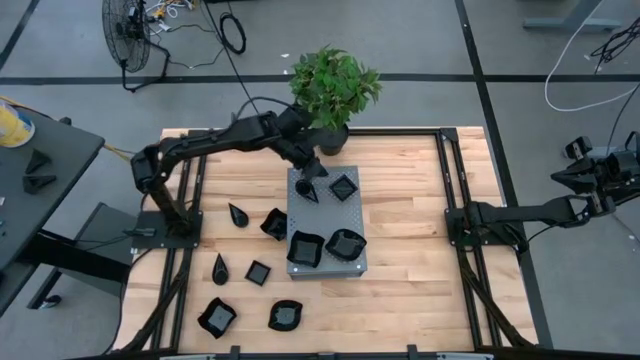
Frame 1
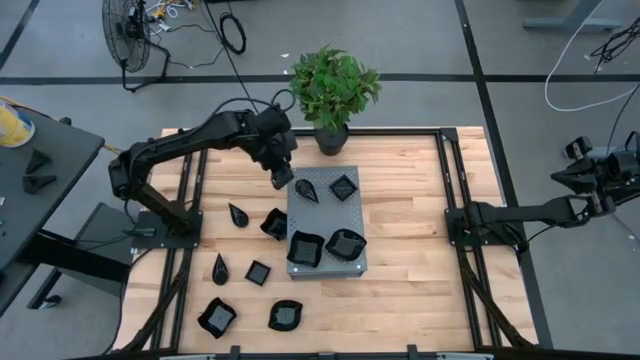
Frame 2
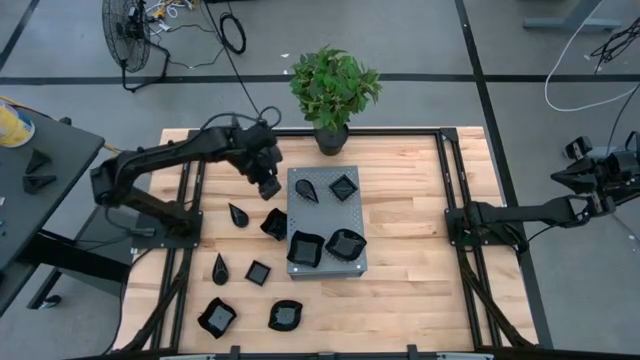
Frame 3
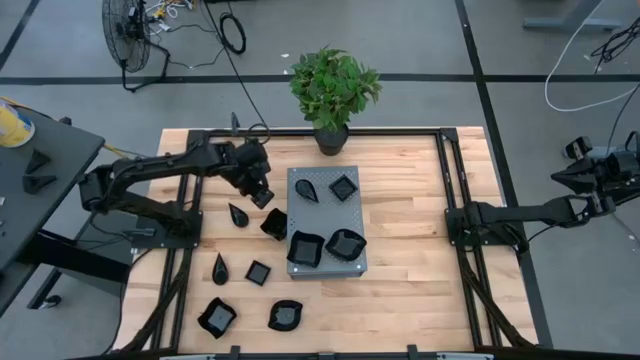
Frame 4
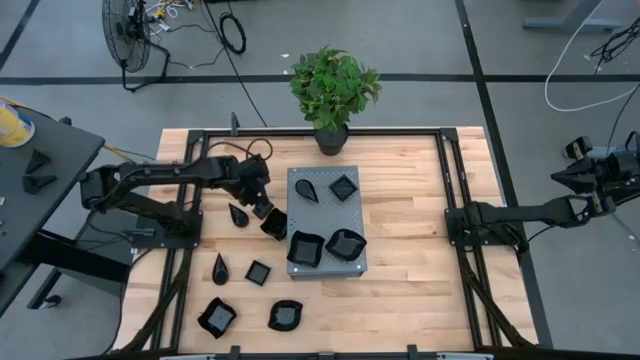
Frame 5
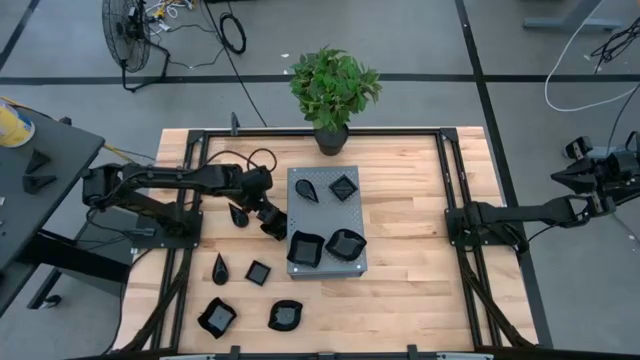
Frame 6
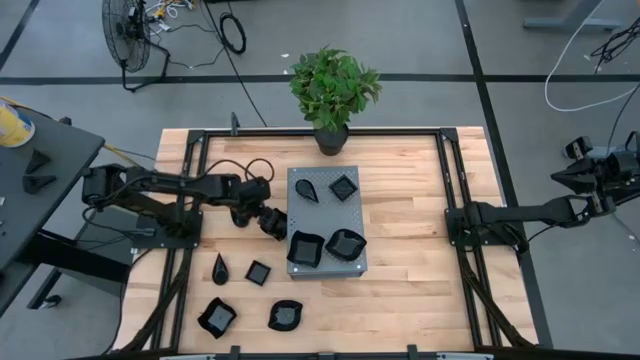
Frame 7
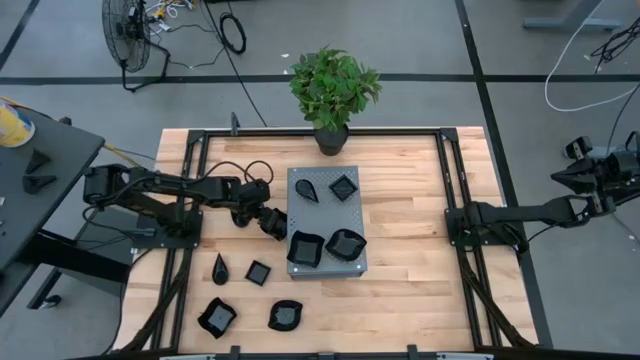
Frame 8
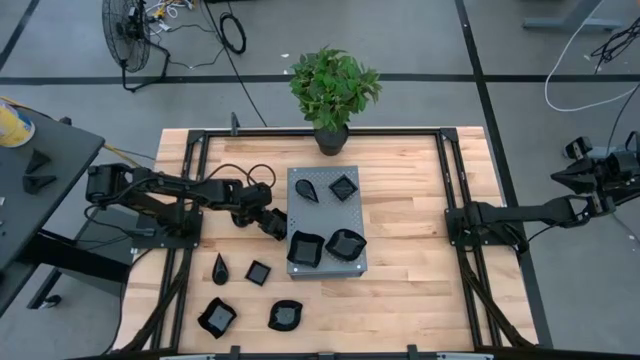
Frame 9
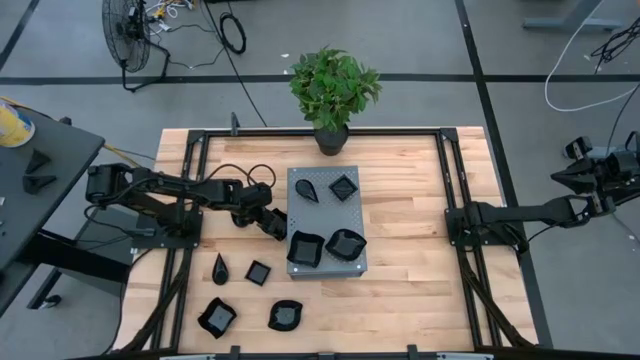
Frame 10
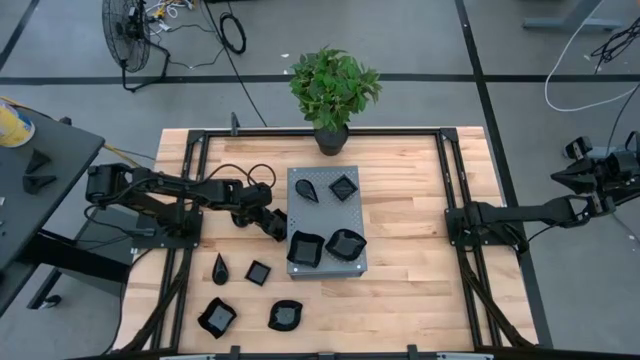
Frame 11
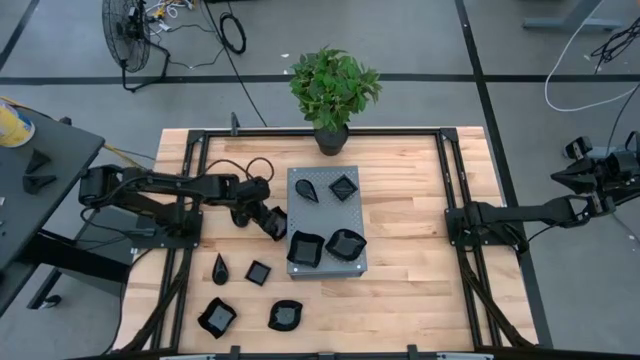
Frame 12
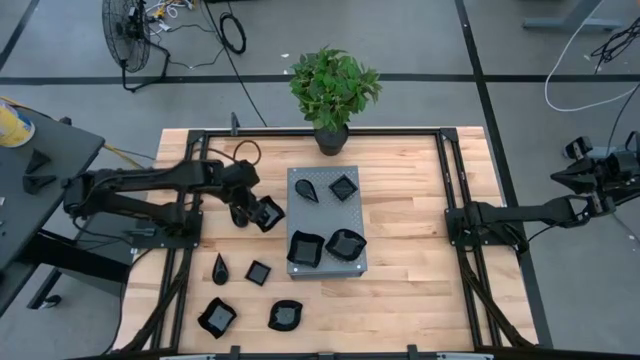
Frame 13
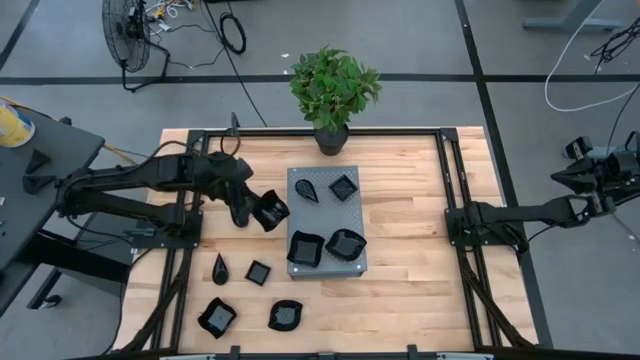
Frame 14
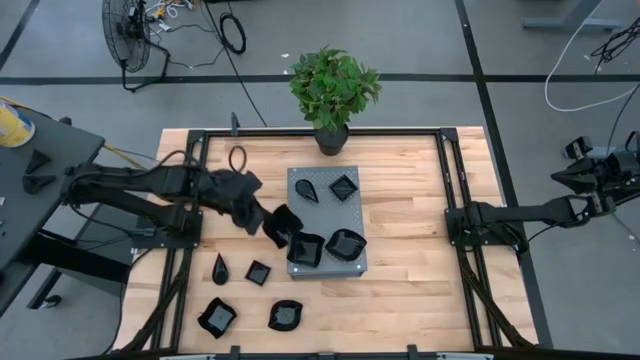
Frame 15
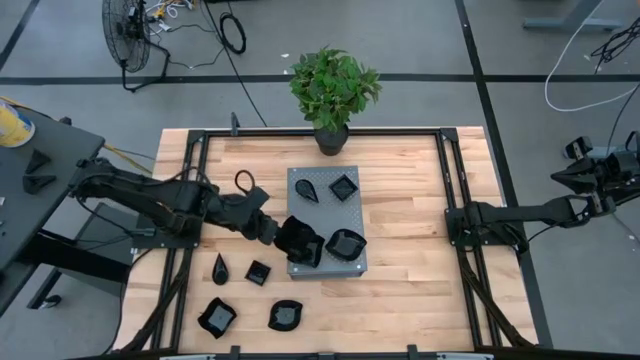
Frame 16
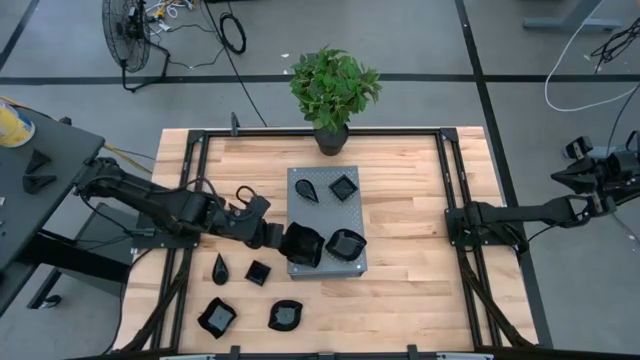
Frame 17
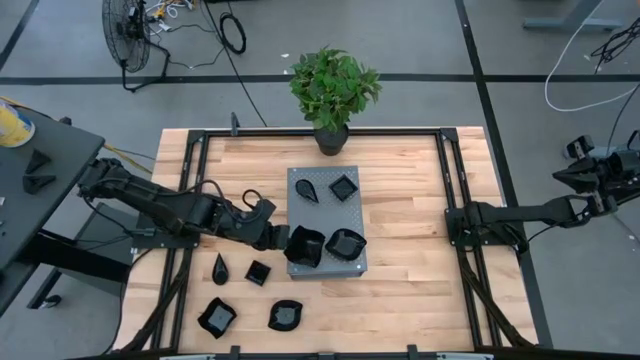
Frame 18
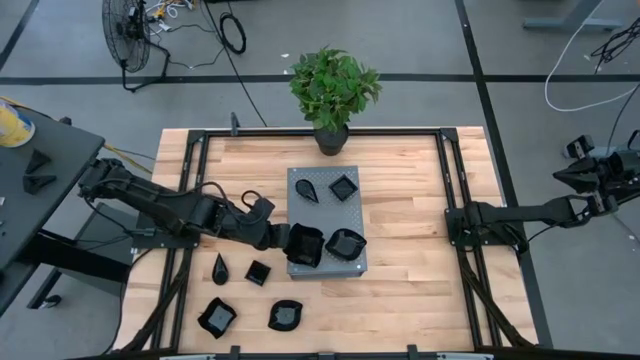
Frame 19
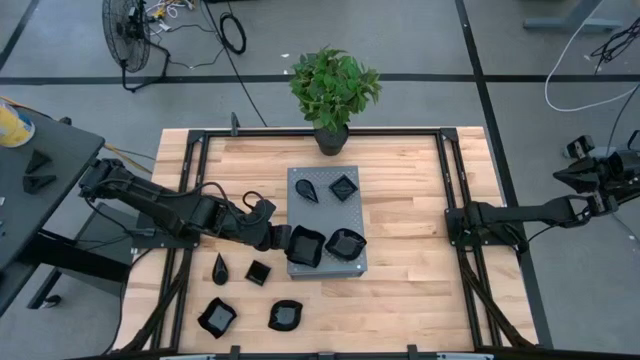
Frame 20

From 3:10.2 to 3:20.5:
Task: Pick & Place Mini shaped plates
Stack the black bowl on top of the black bowl on the shelf

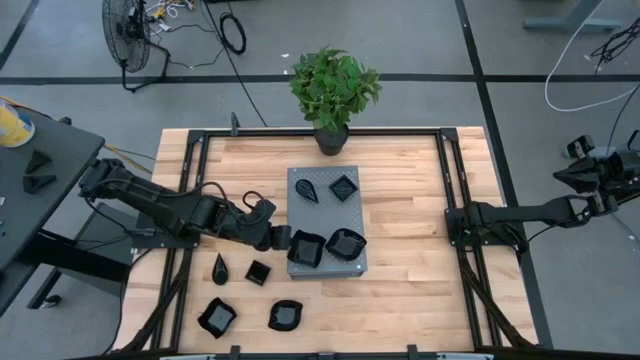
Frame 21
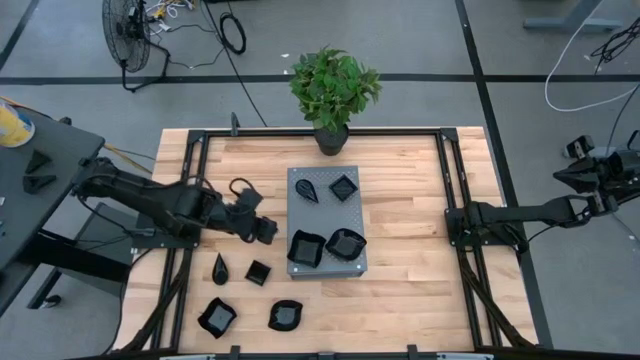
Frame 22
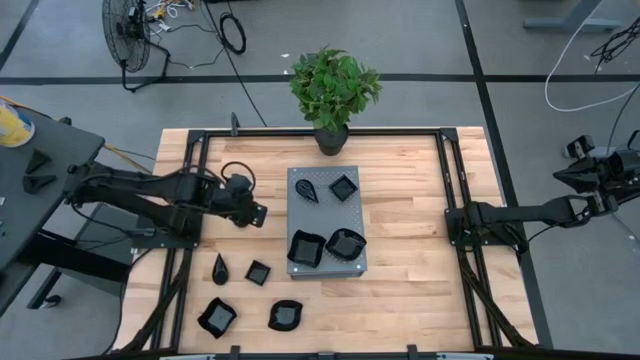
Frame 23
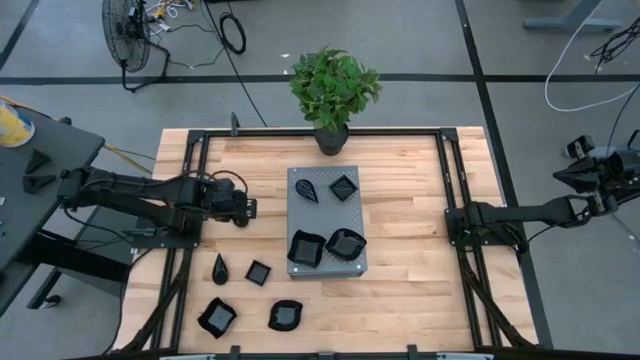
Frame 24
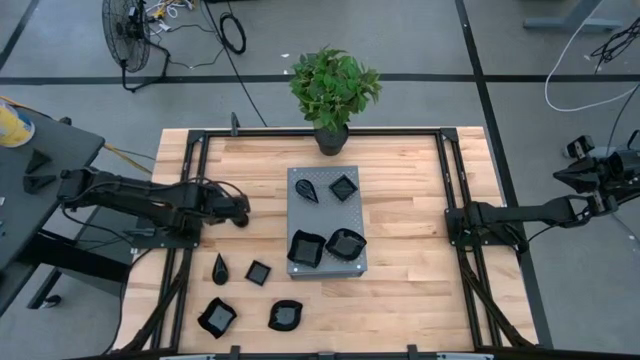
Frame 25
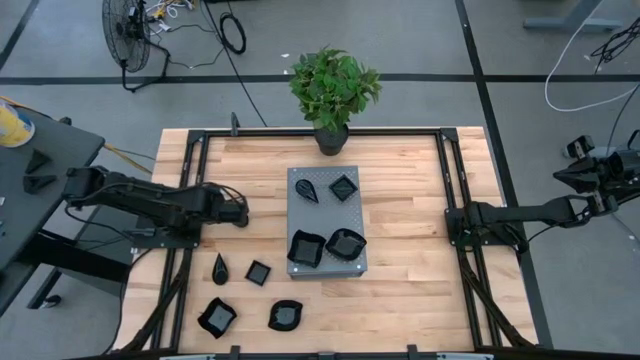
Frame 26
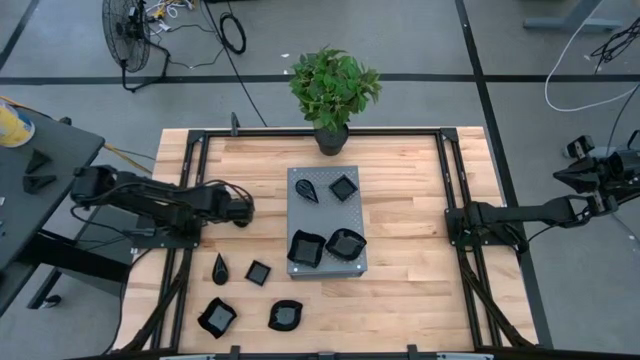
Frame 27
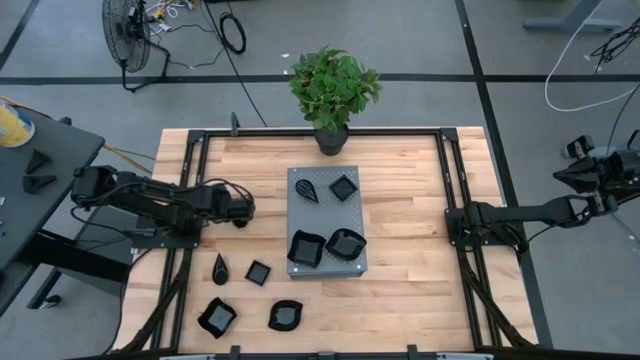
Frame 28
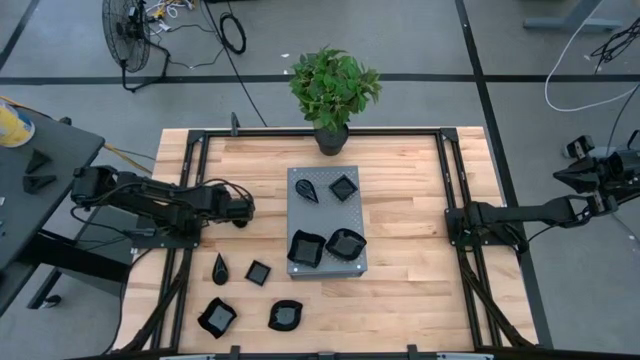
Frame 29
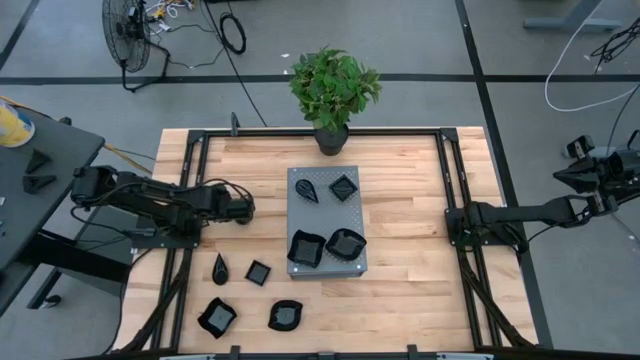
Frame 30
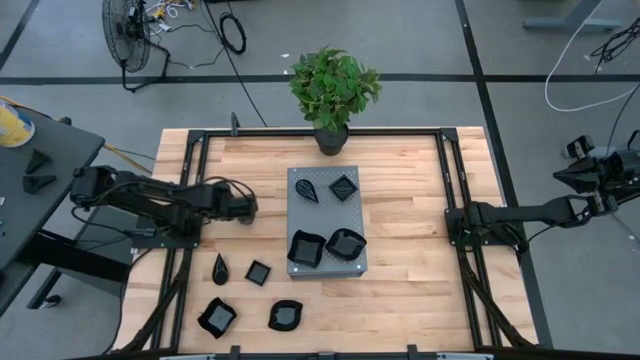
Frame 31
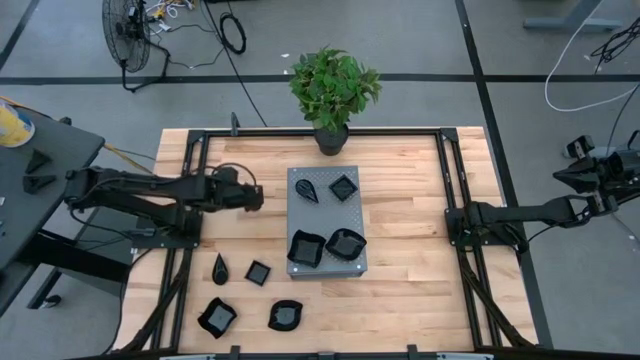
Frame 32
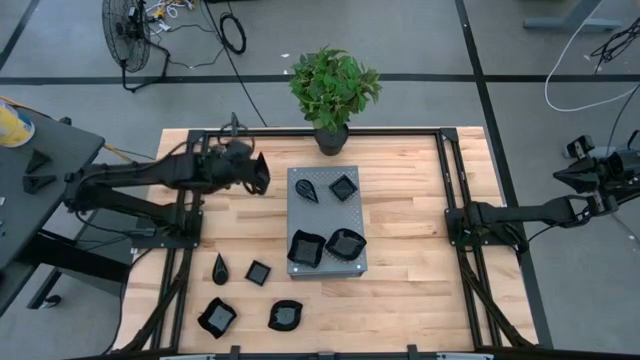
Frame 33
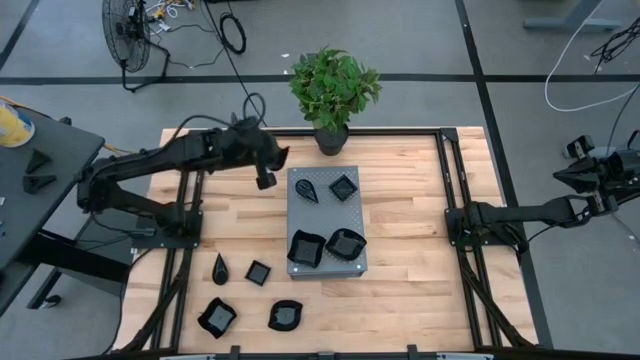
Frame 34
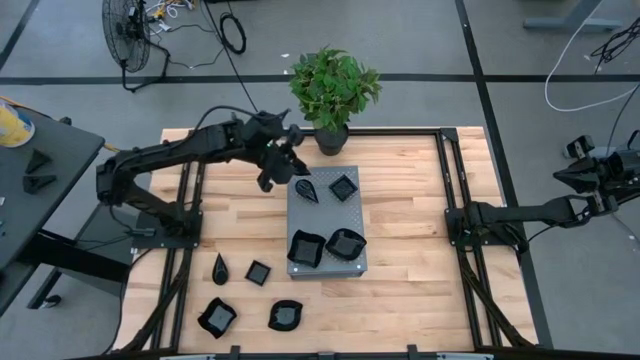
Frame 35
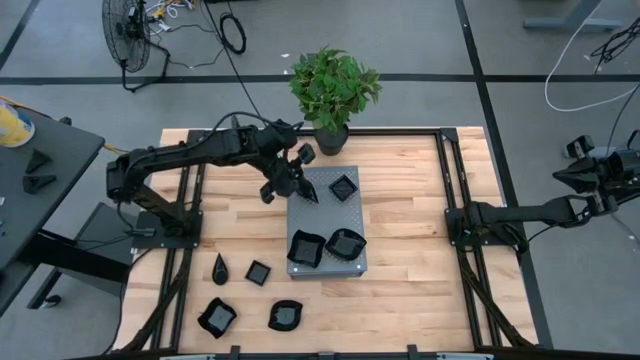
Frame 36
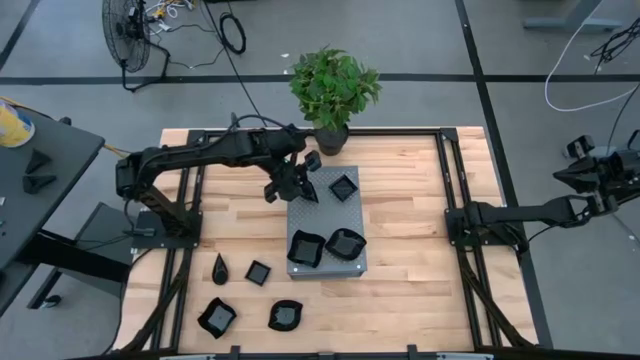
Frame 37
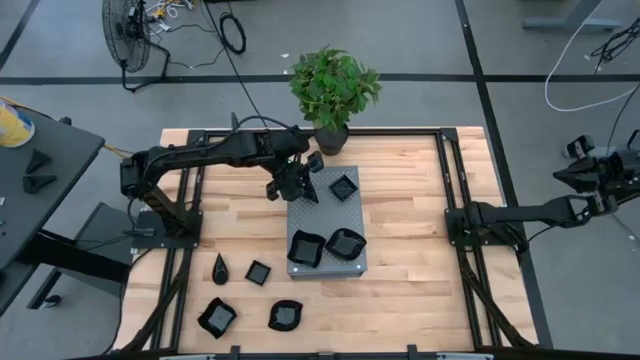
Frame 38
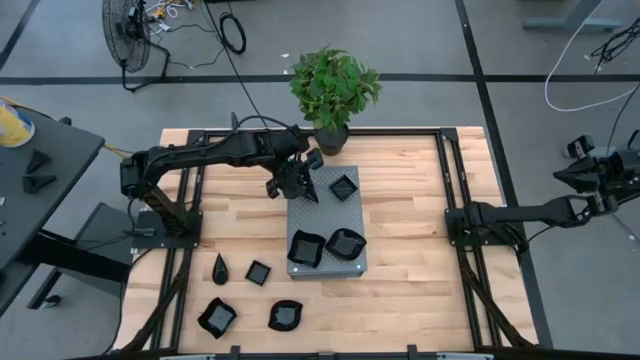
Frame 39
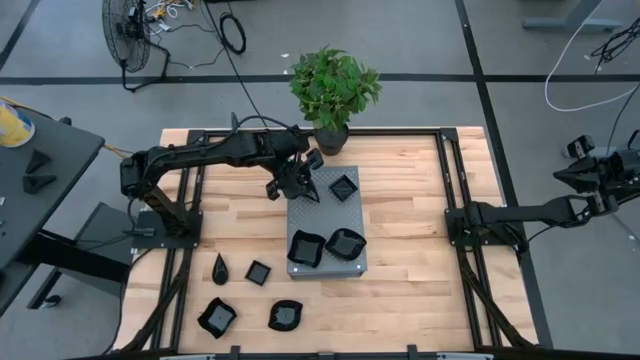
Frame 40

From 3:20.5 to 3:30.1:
Stack the black bowl on top of the black bowl on the shelf

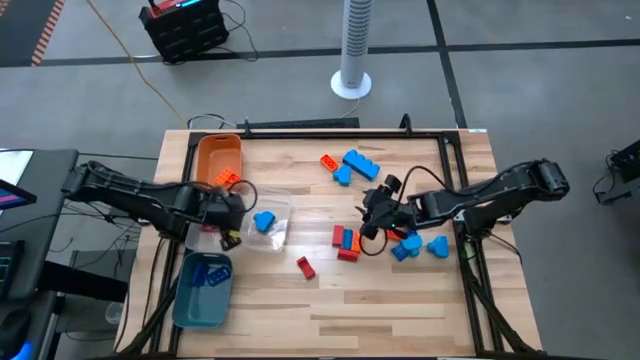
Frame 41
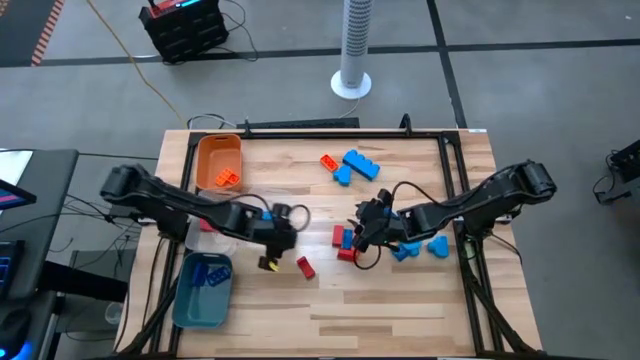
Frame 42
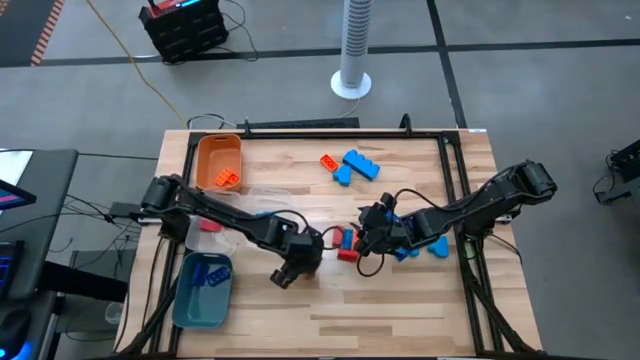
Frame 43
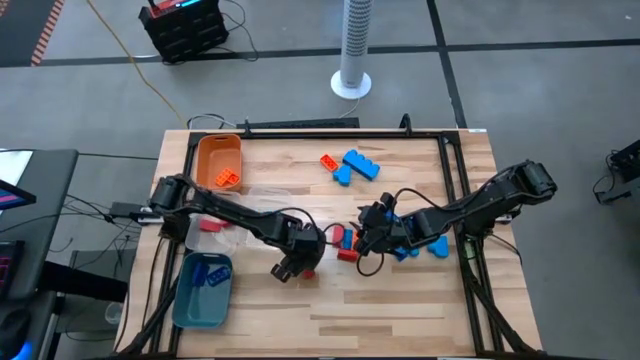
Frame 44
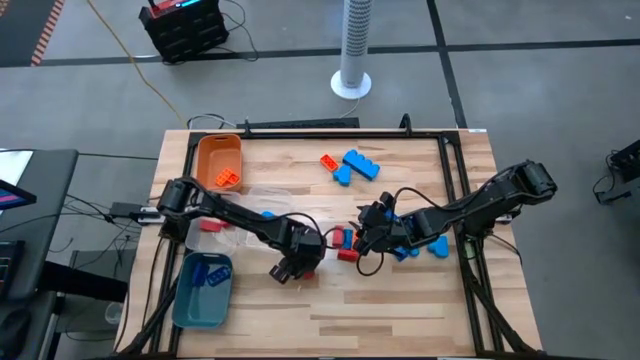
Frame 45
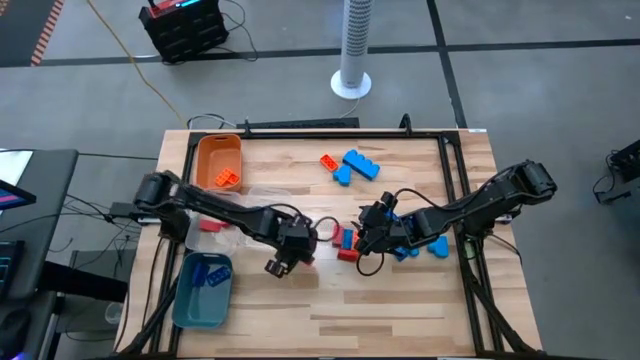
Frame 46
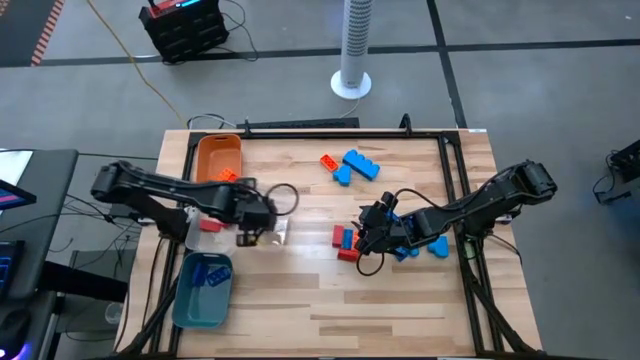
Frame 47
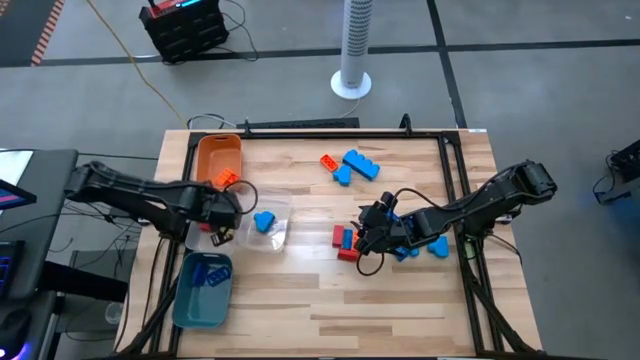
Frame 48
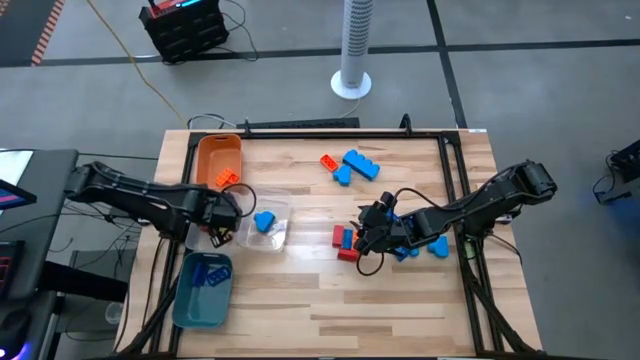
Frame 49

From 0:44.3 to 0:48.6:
Task: Sort blocks
Put the red block into the left transparent bin
